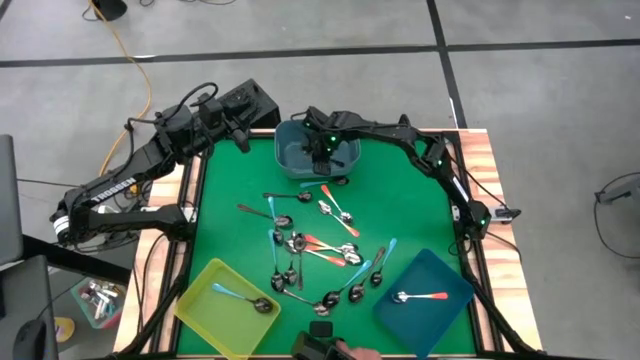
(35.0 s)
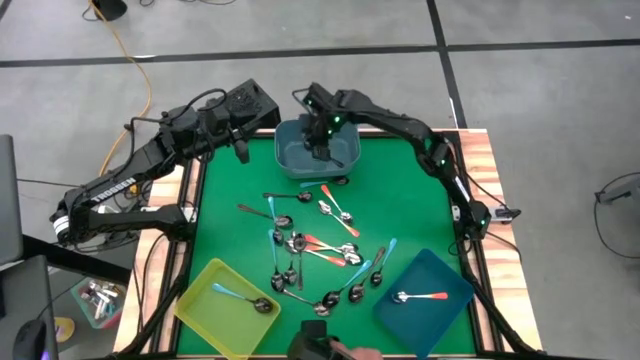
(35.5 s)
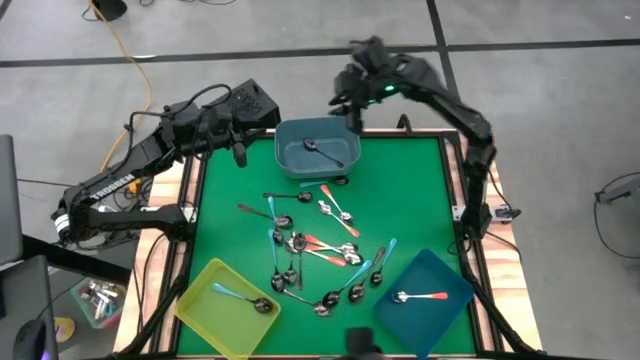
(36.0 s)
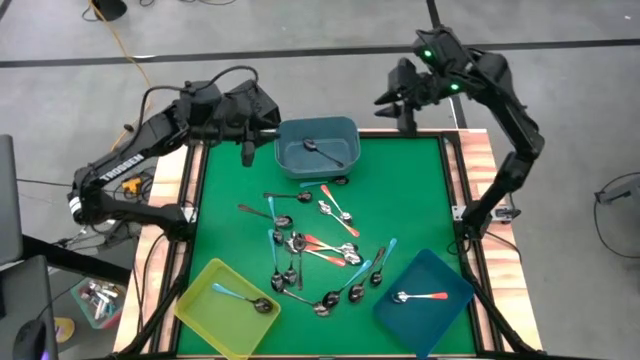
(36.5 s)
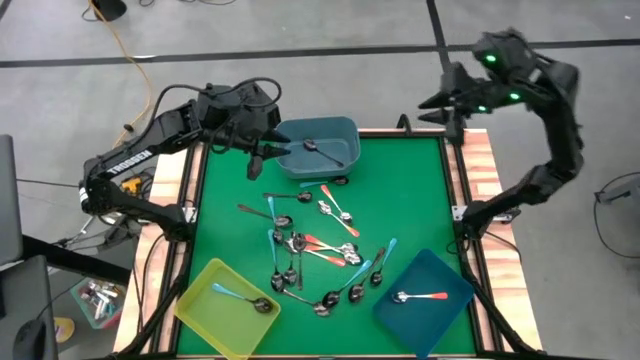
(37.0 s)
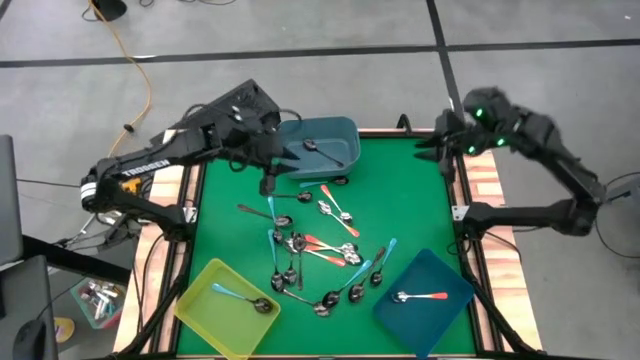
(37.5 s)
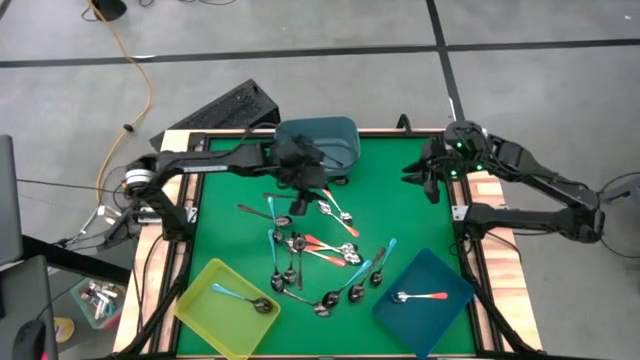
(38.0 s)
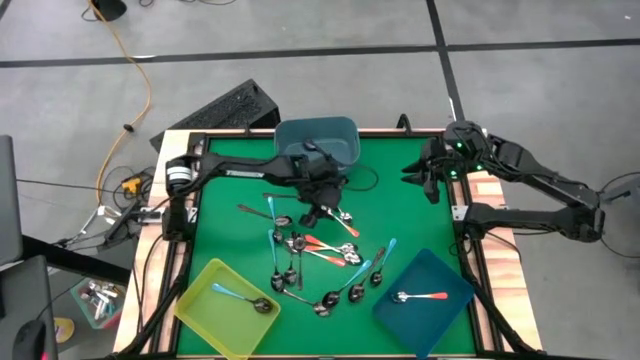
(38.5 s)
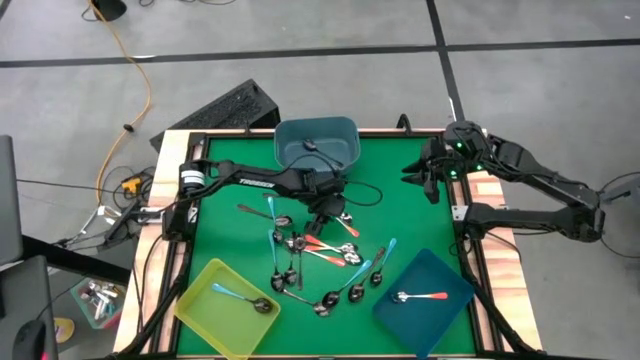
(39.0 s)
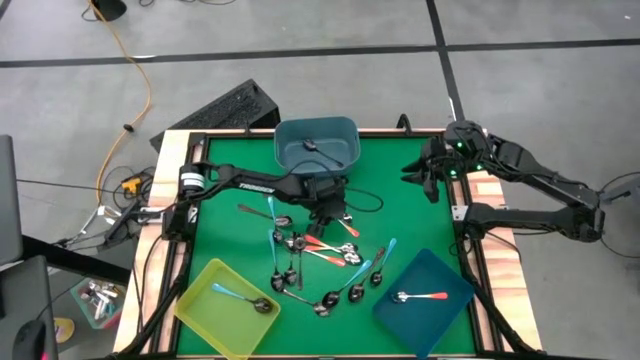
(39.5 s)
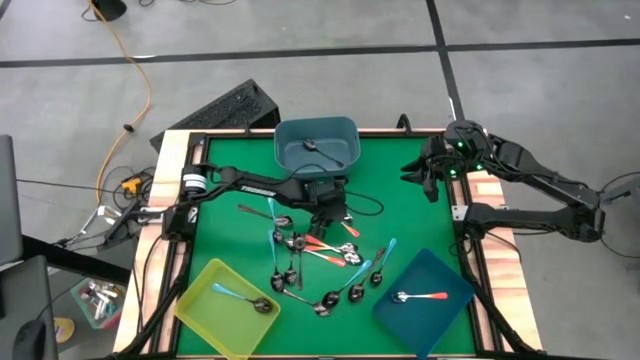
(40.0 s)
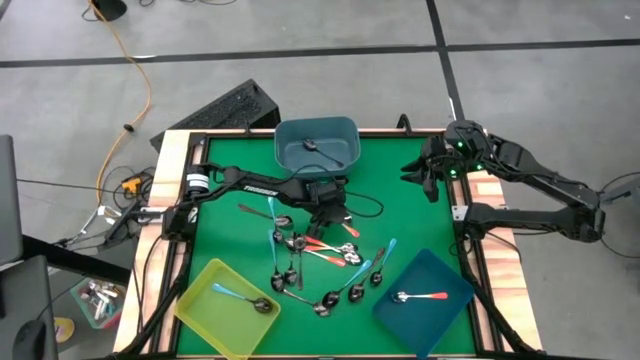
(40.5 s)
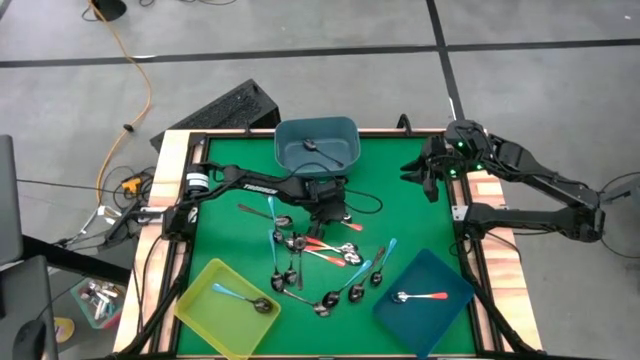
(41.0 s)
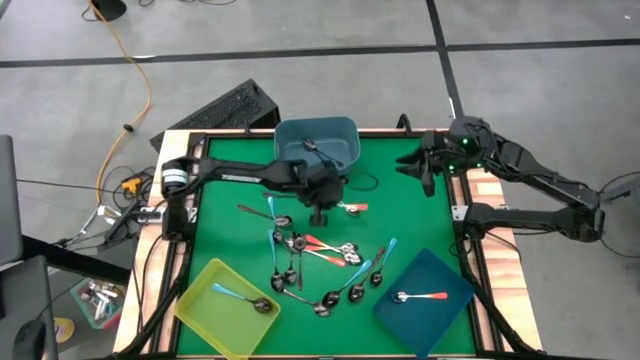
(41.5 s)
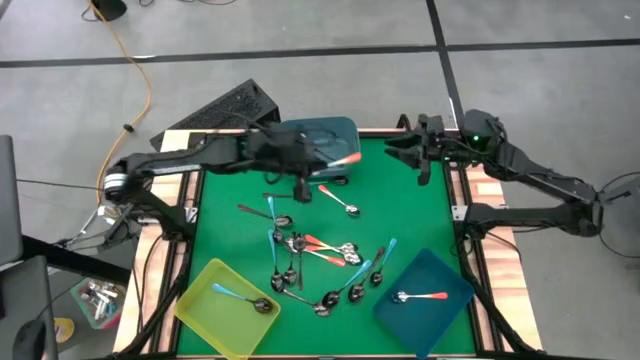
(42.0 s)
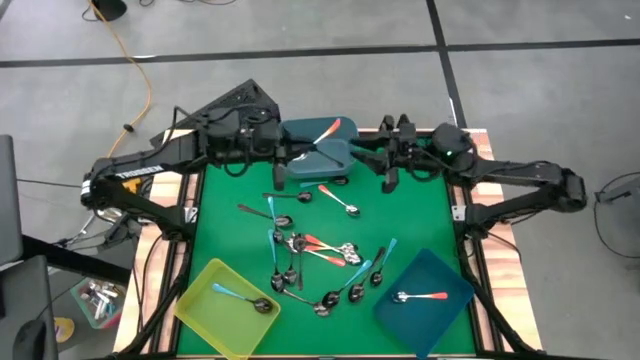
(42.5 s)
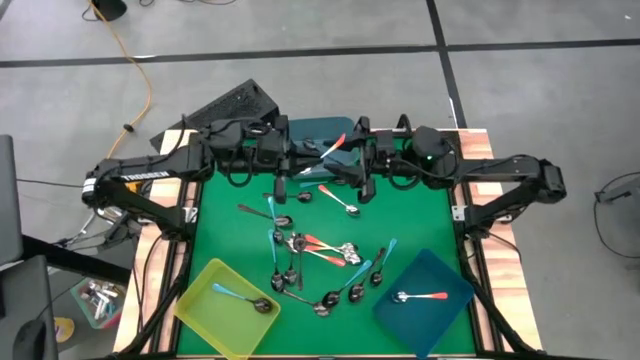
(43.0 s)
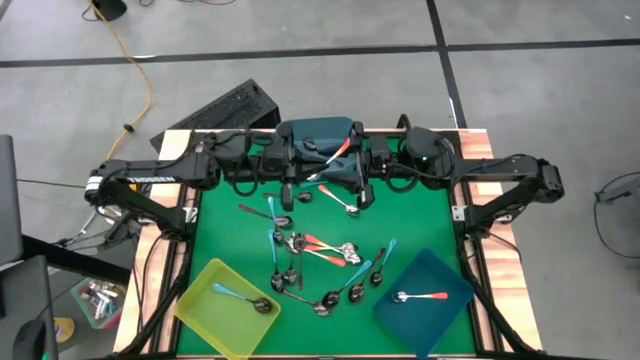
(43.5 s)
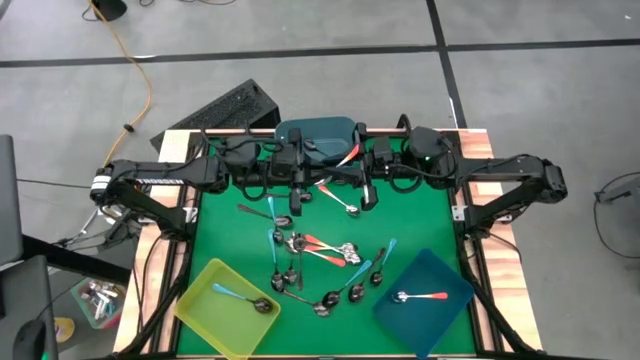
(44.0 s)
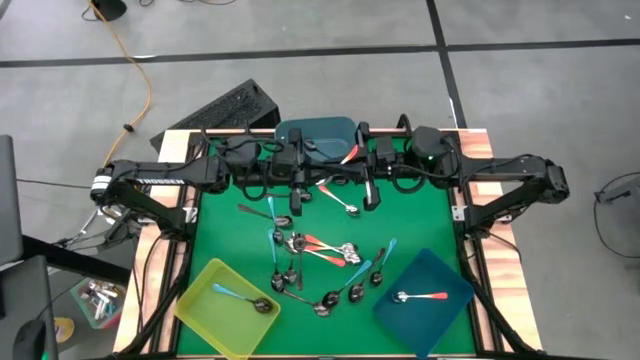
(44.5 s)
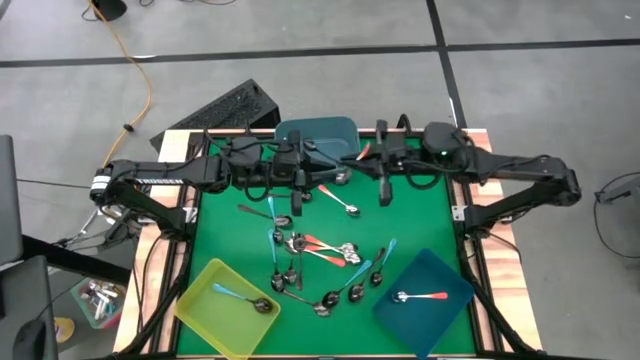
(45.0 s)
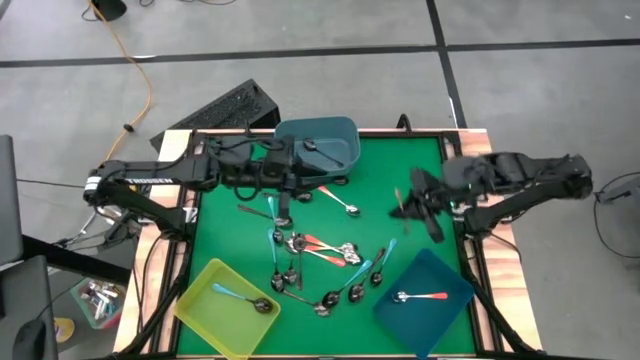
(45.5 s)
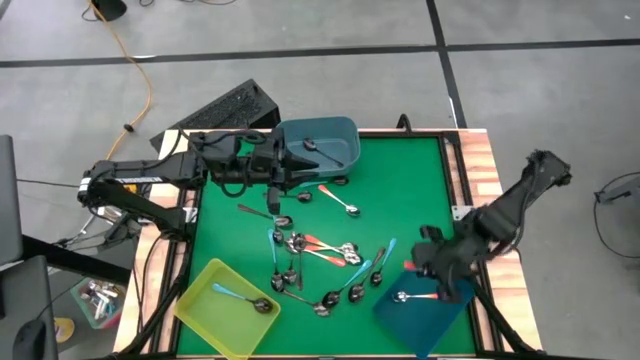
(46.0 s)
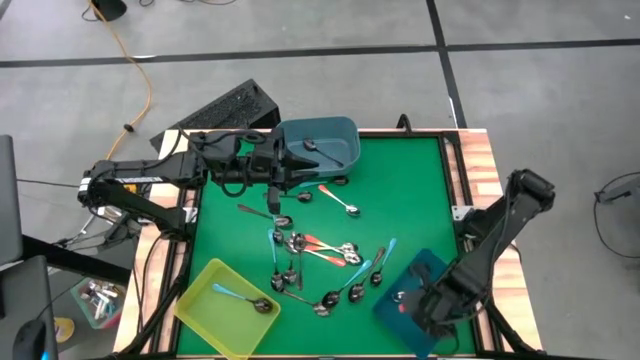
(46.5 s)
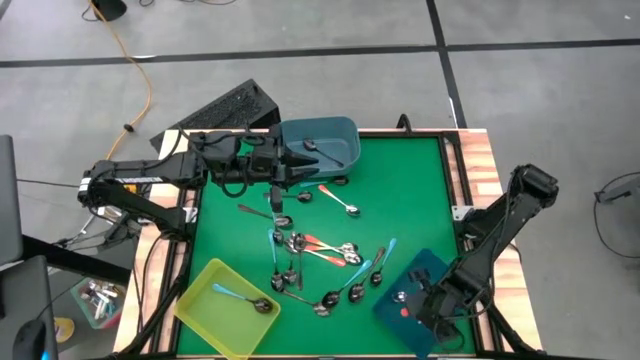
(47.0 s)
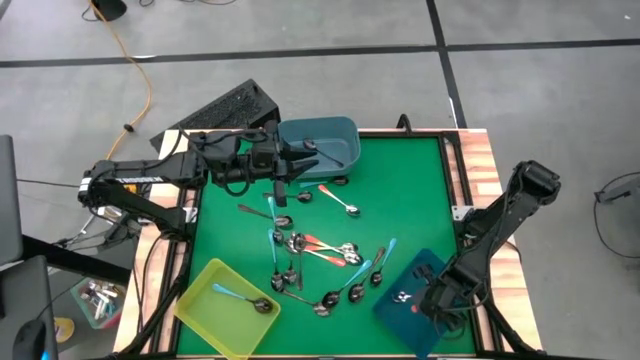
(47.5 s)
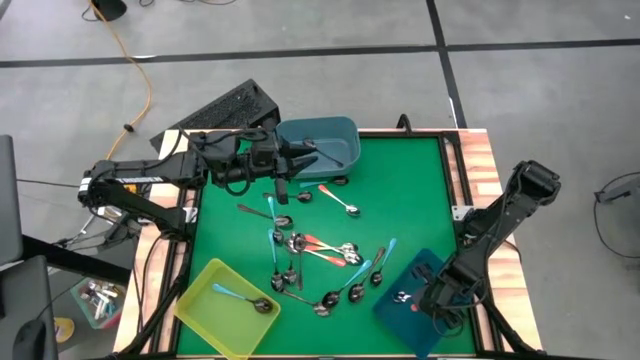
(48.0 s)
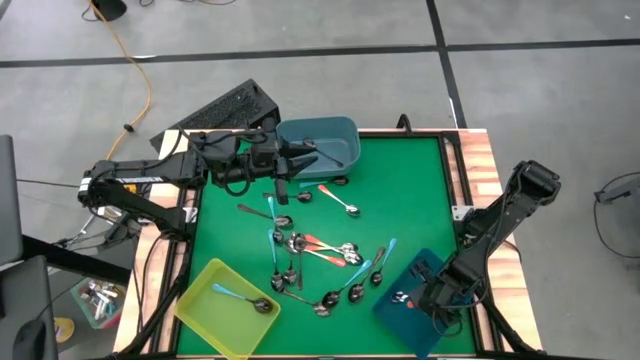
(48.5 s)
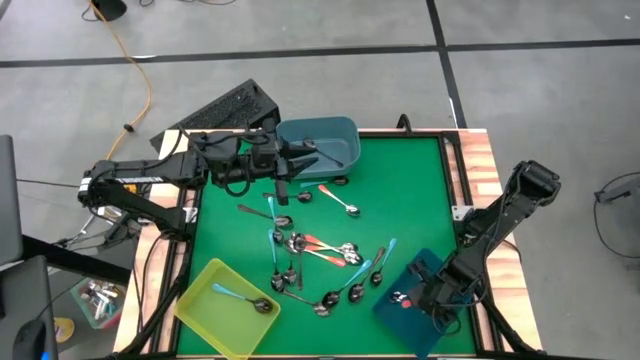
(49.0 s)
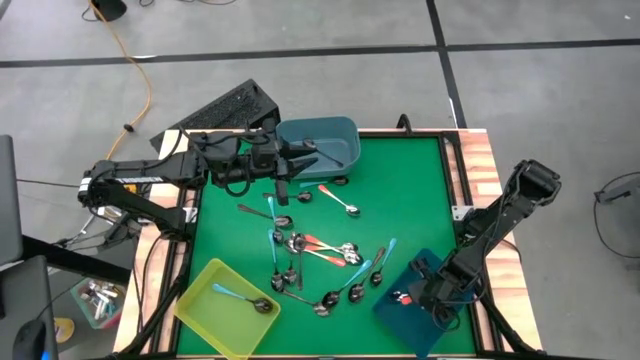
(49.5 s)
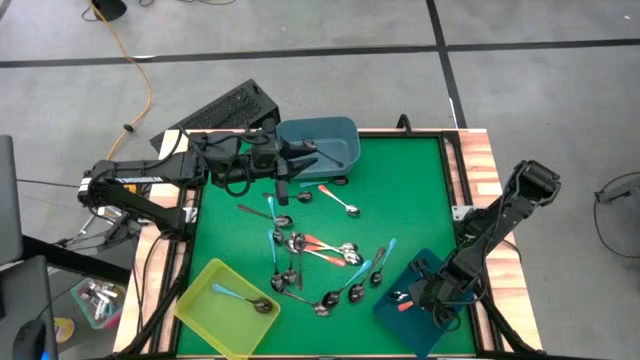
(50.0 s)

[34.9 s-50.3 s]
Task: Sort silverware by color (type)
Put the orange spoon into the blue bin

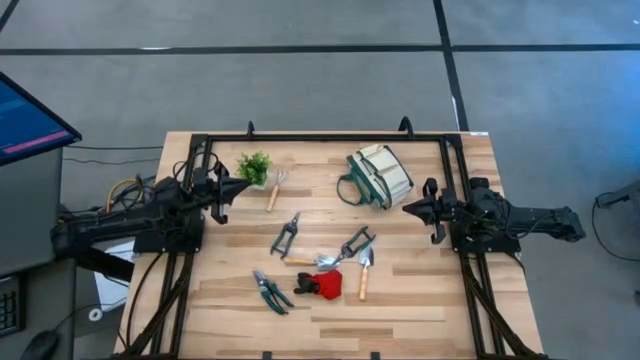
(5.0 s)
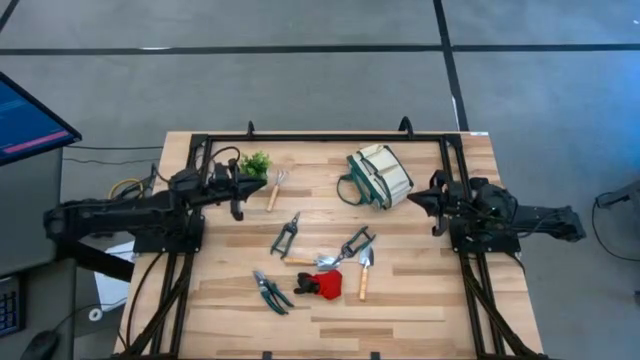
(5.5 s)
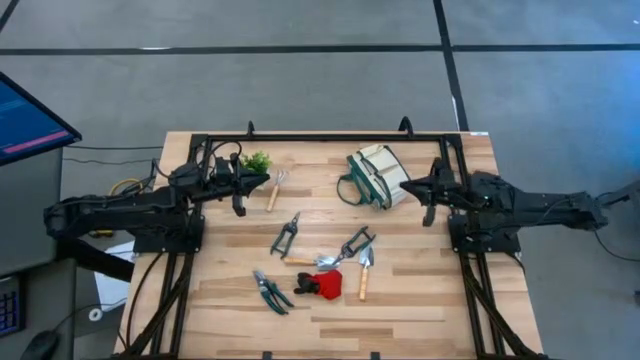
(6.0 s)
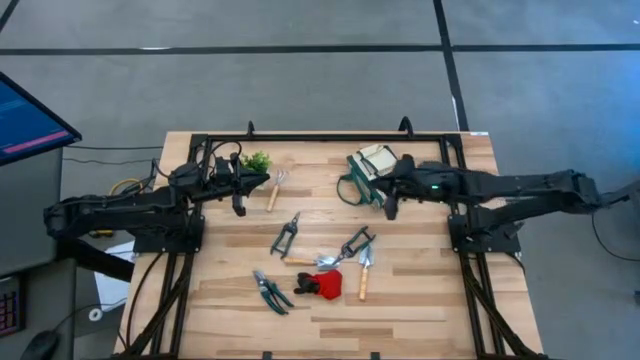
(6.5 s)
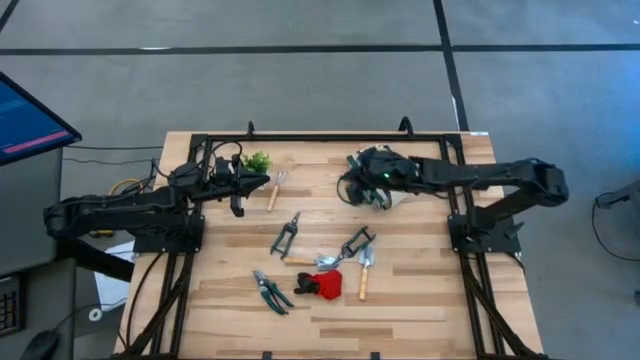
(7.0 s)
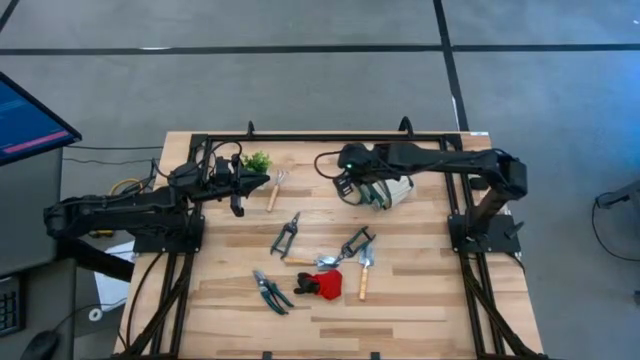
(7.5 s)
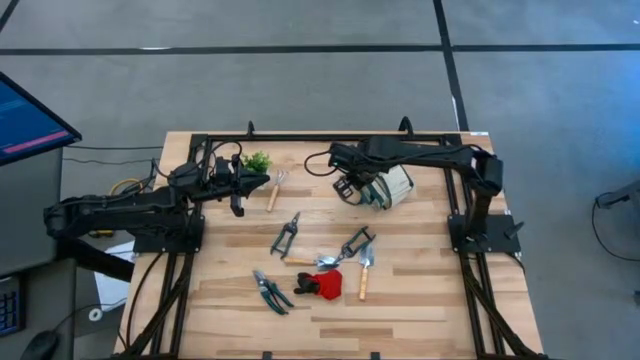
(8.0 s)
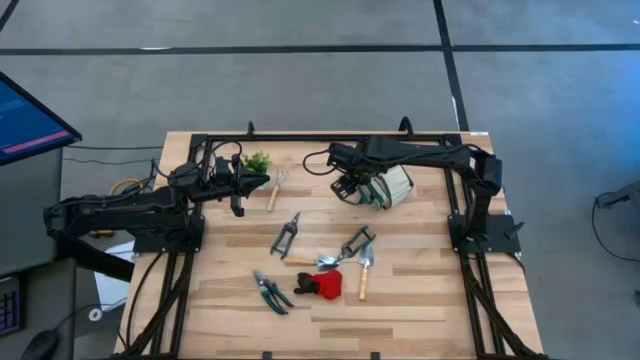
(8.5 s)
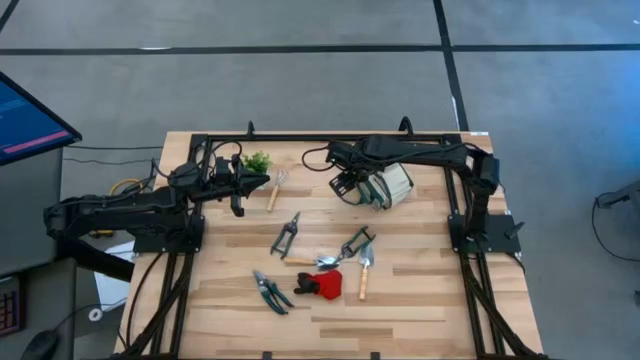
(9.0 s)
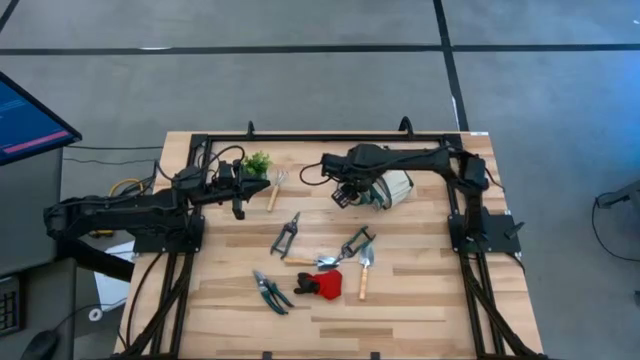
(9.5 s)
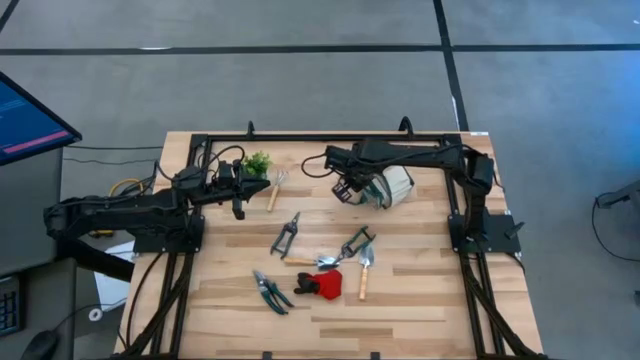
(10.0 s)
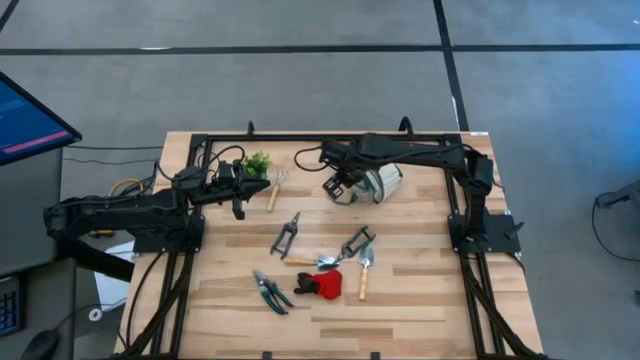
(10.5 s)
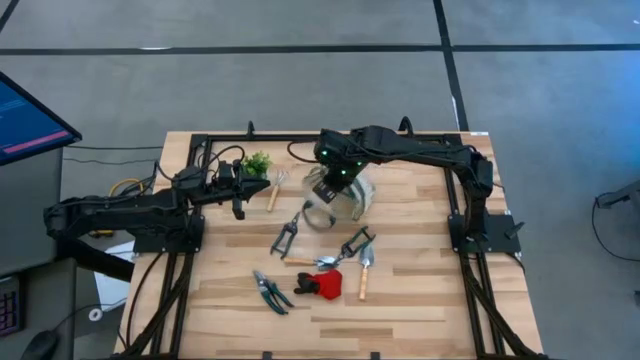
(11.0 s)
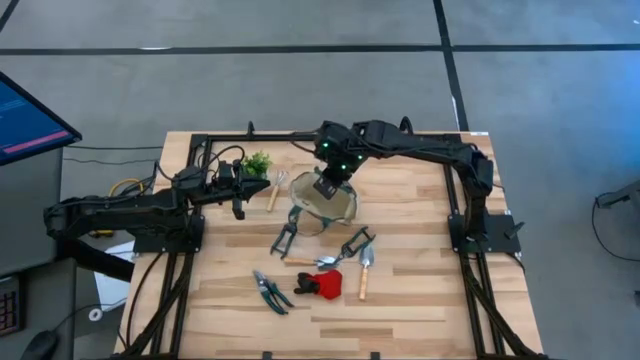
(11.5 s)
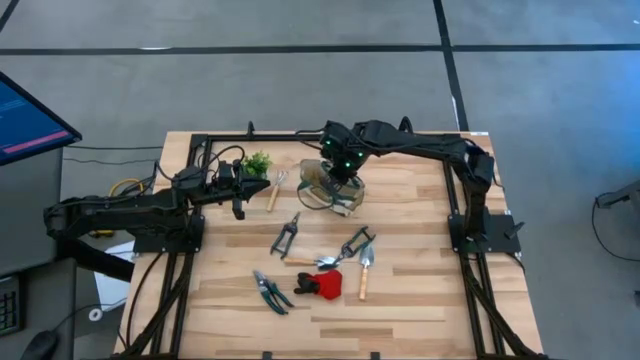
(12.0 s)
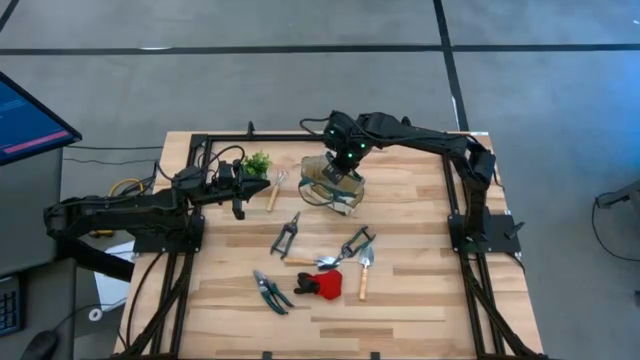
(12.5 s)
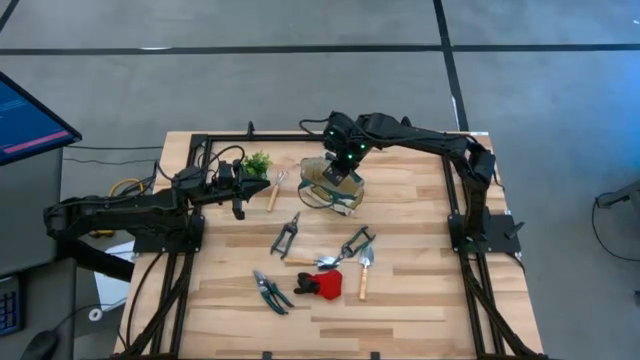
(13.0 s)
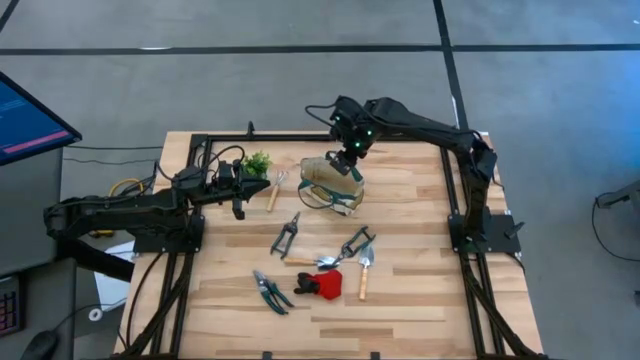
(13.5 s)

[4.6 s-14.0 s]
Task: Pick & Place Garden tools in Gardening bag
Prepare the gardening bag
